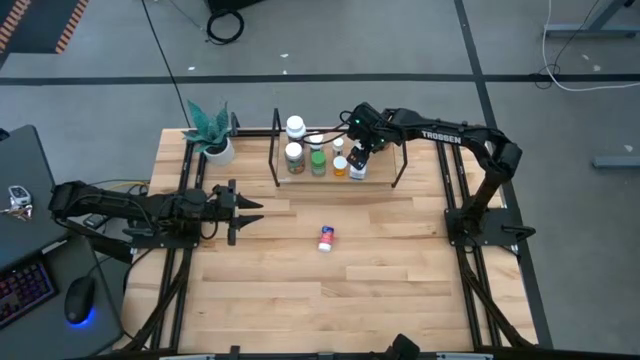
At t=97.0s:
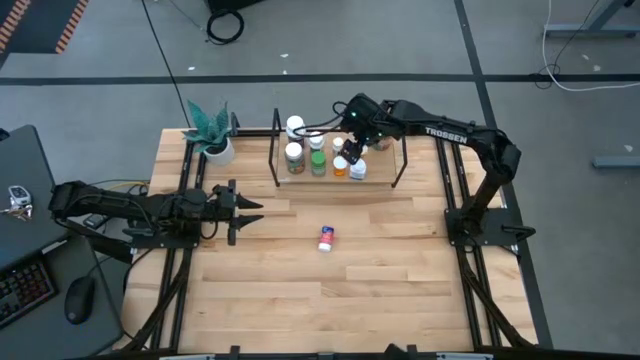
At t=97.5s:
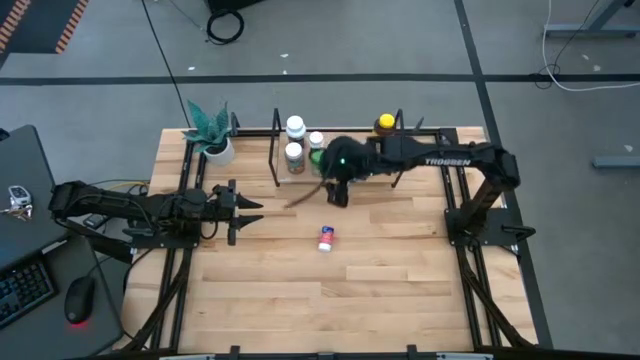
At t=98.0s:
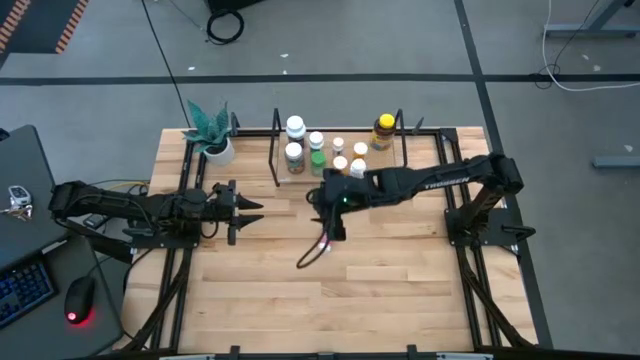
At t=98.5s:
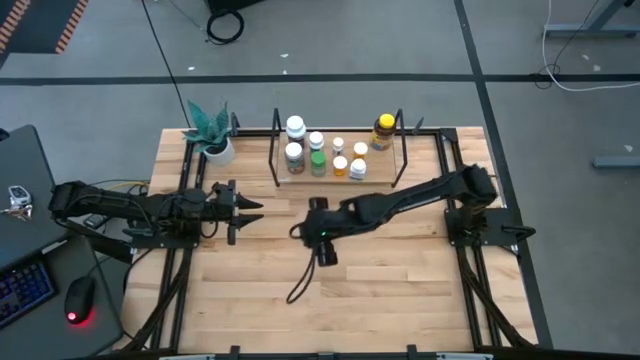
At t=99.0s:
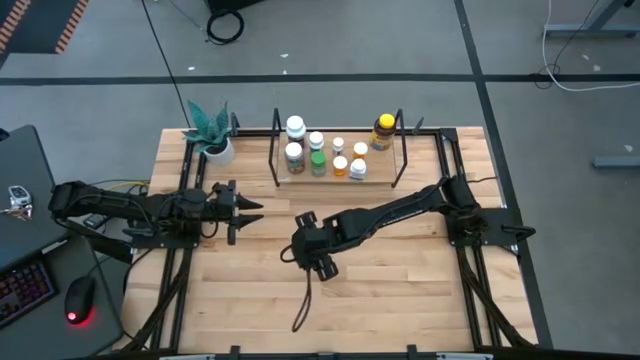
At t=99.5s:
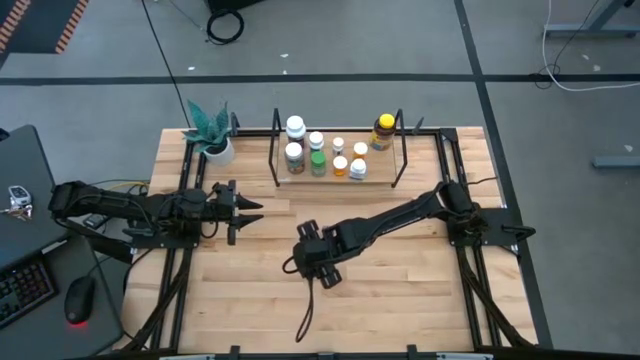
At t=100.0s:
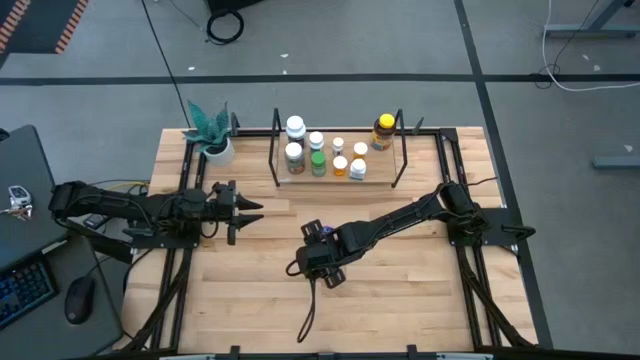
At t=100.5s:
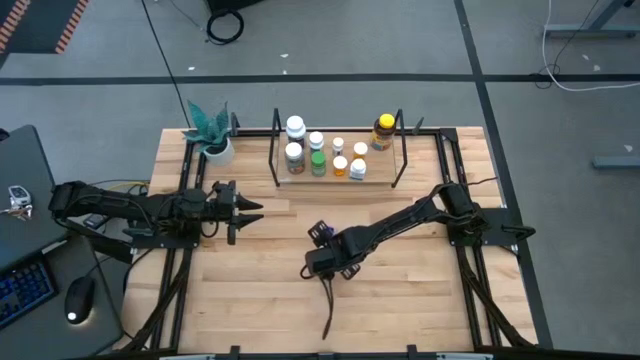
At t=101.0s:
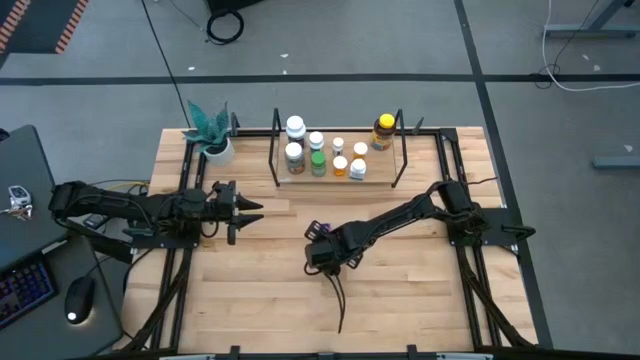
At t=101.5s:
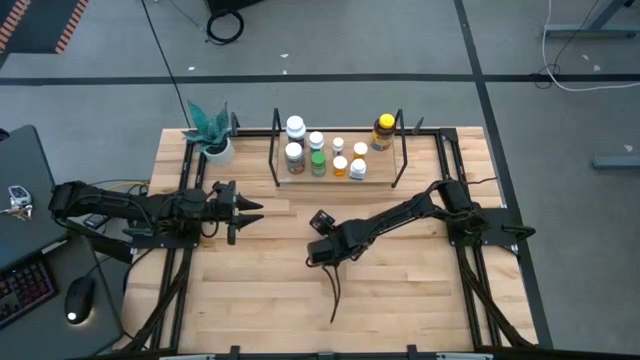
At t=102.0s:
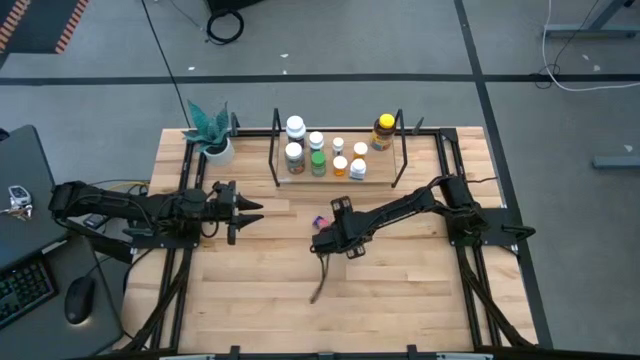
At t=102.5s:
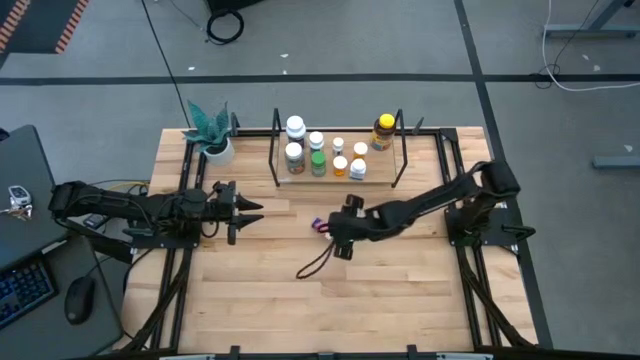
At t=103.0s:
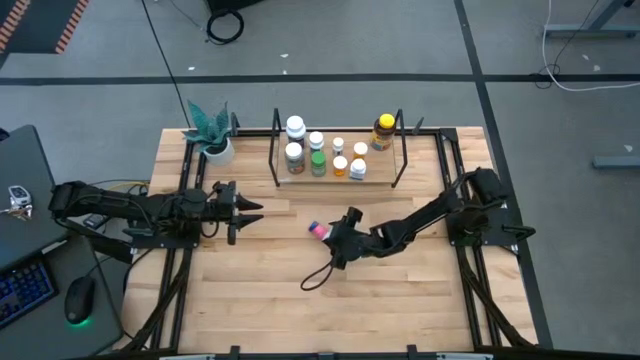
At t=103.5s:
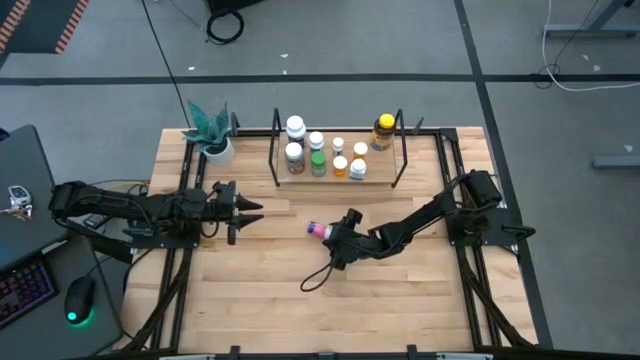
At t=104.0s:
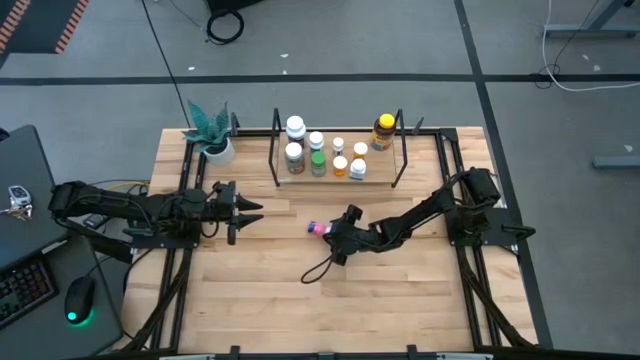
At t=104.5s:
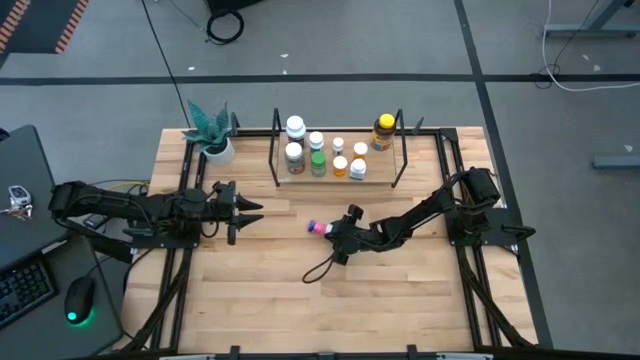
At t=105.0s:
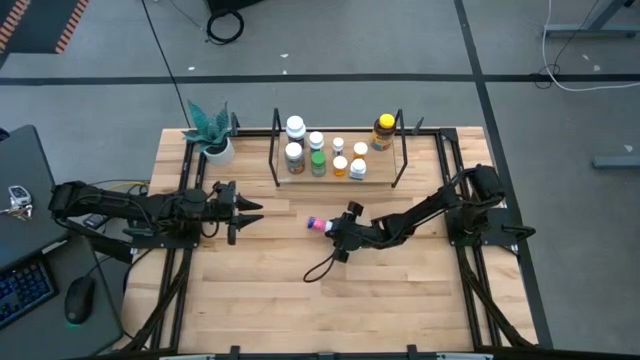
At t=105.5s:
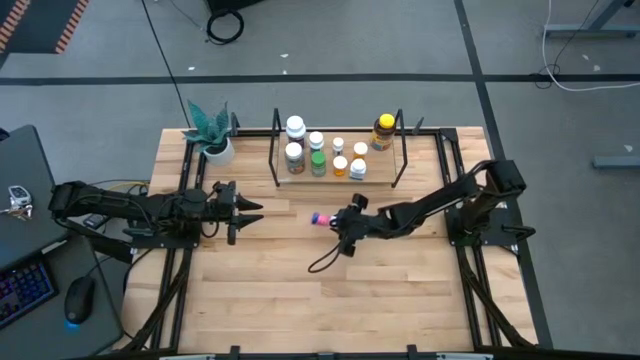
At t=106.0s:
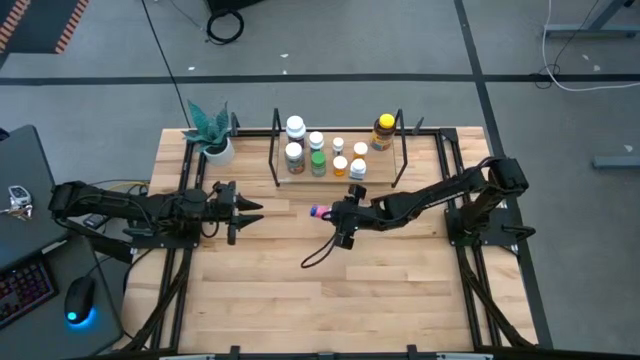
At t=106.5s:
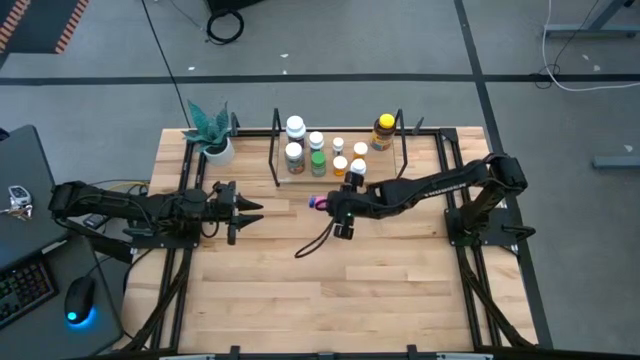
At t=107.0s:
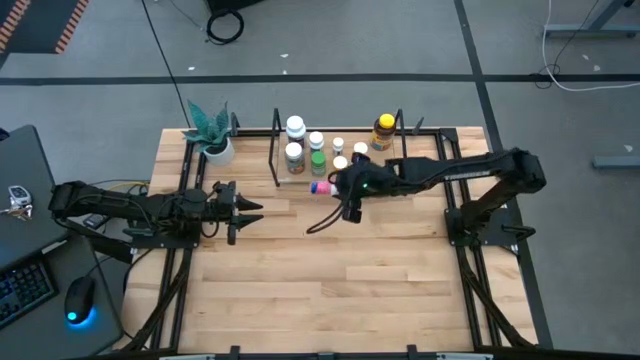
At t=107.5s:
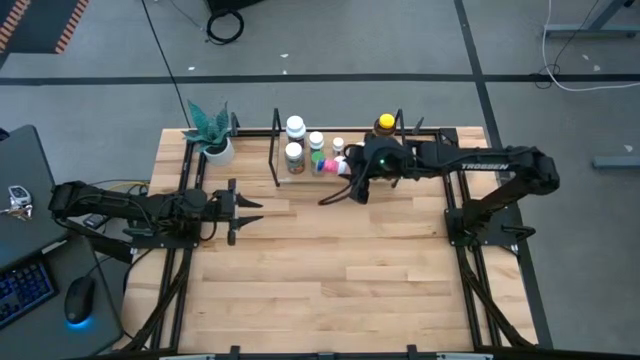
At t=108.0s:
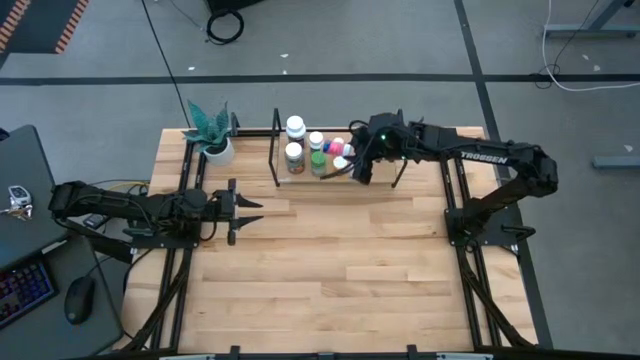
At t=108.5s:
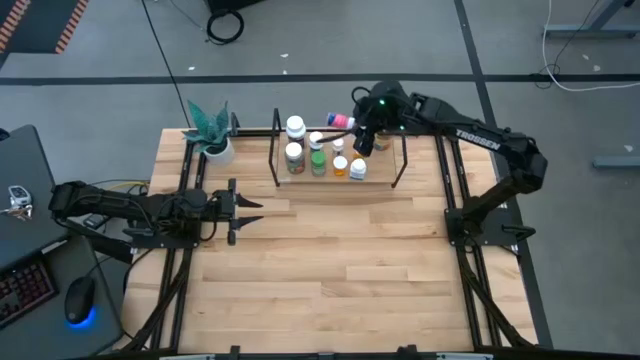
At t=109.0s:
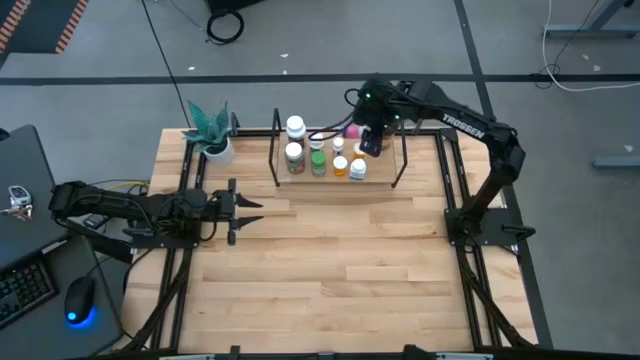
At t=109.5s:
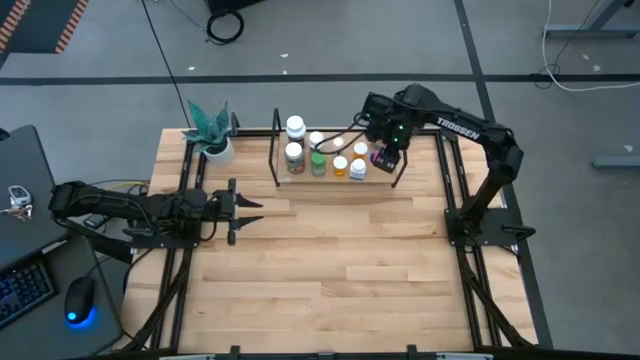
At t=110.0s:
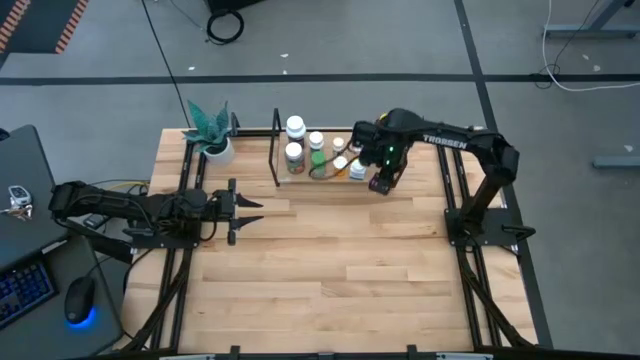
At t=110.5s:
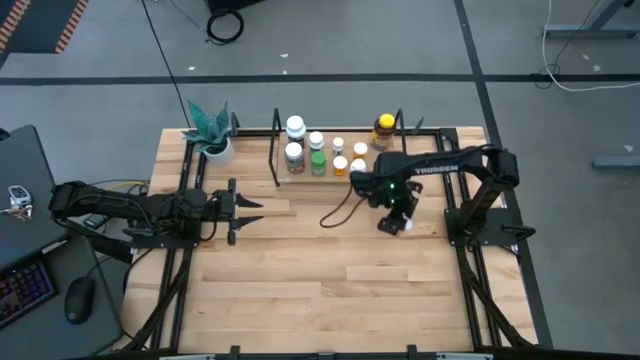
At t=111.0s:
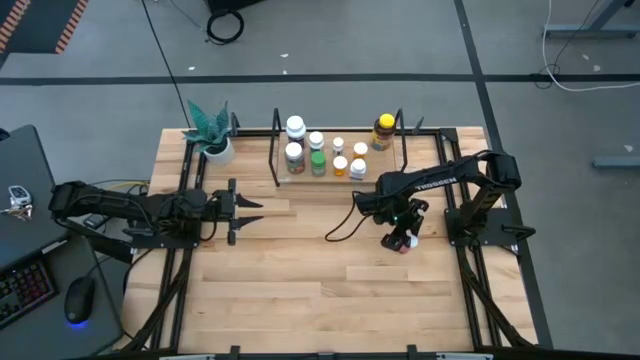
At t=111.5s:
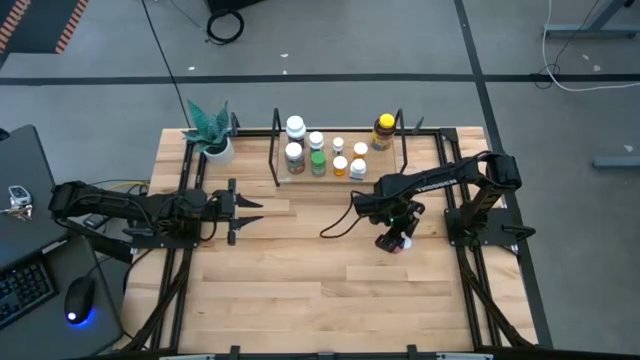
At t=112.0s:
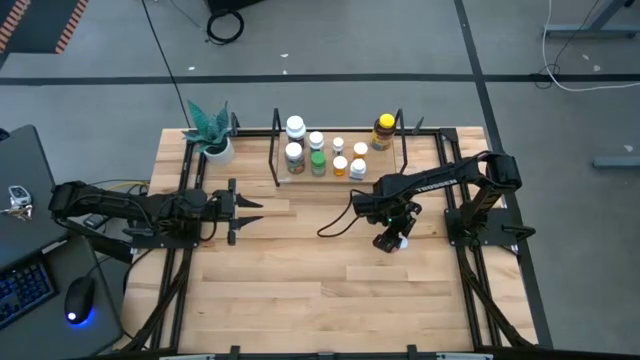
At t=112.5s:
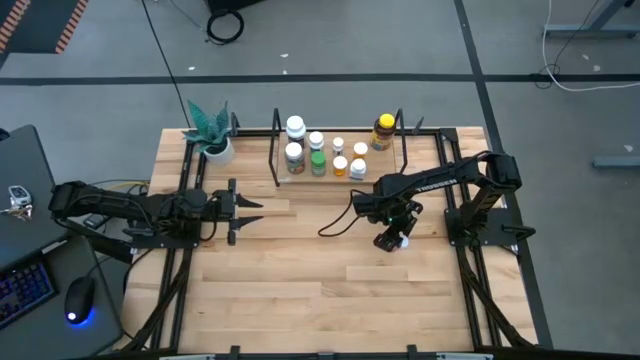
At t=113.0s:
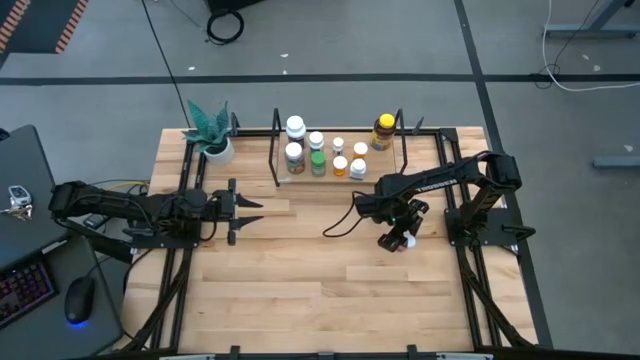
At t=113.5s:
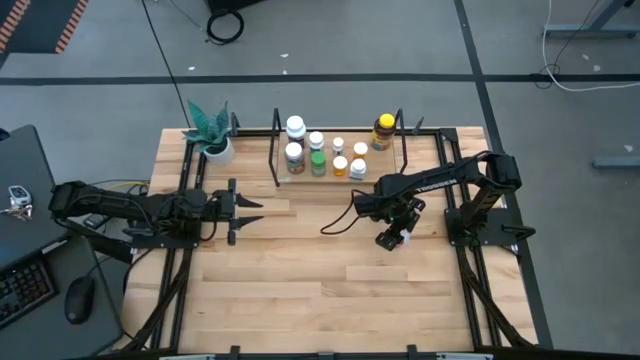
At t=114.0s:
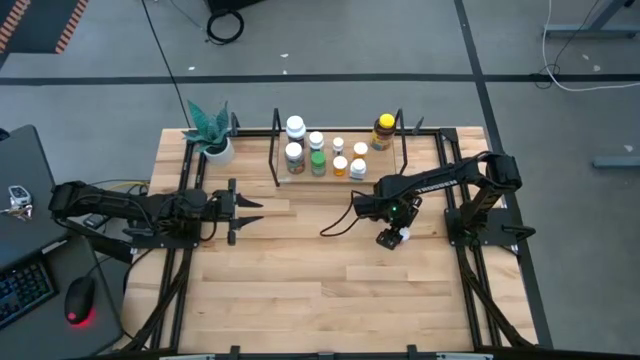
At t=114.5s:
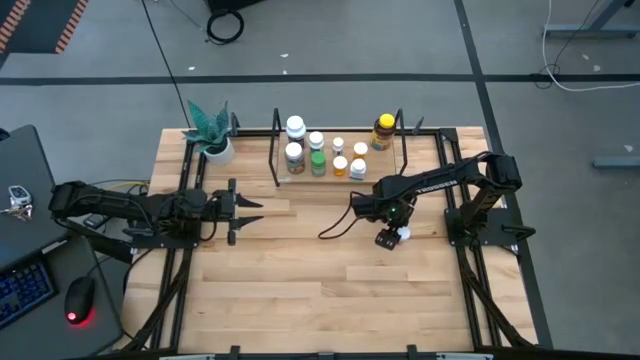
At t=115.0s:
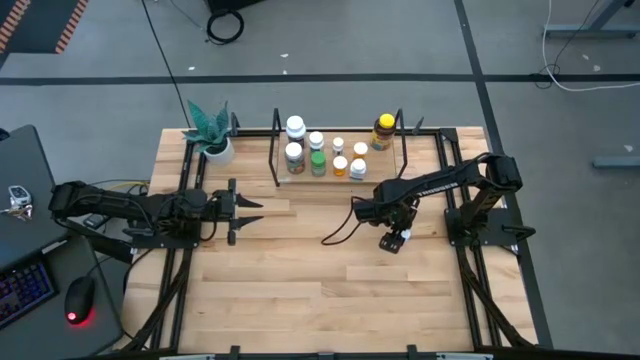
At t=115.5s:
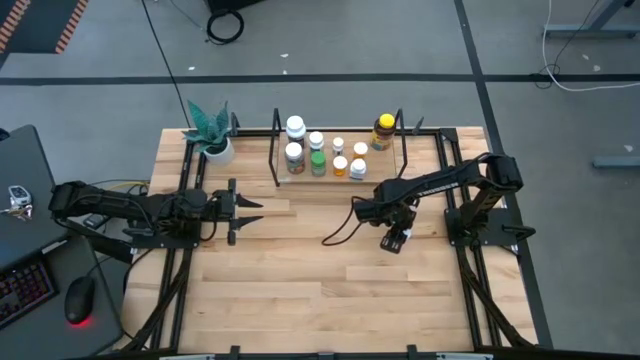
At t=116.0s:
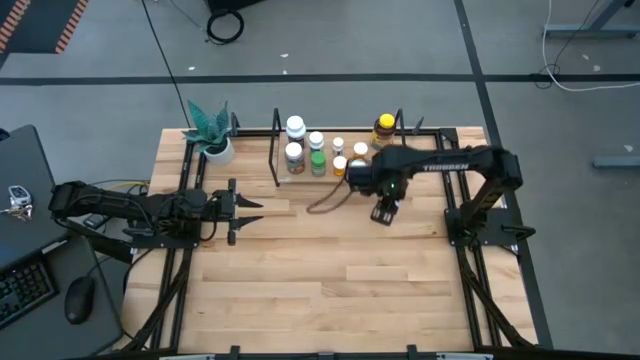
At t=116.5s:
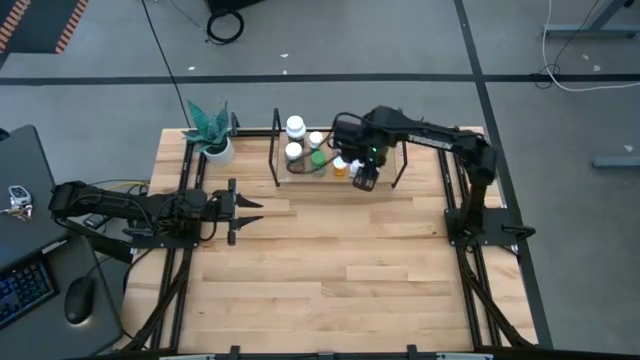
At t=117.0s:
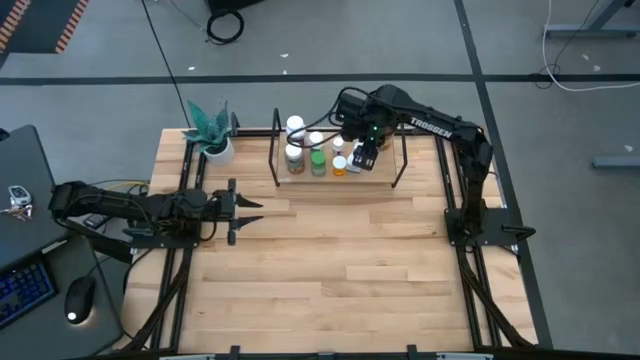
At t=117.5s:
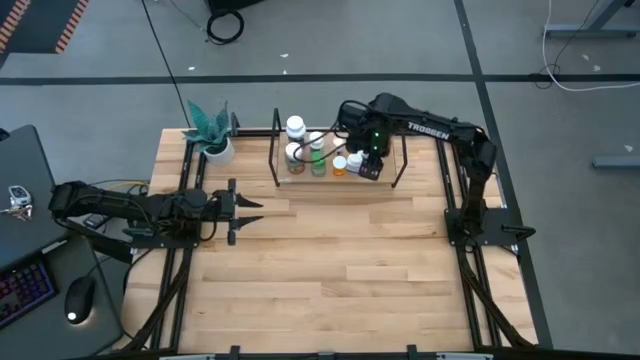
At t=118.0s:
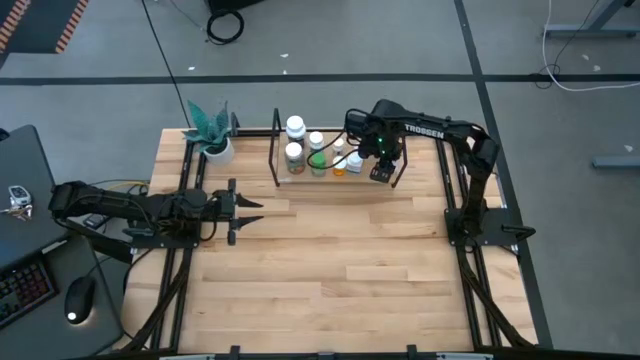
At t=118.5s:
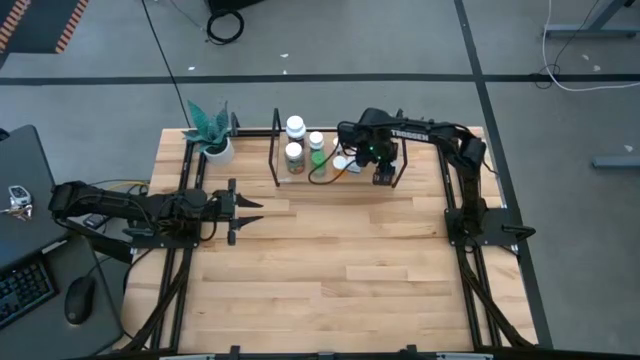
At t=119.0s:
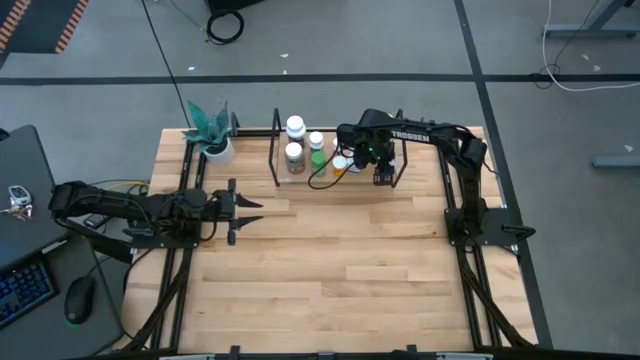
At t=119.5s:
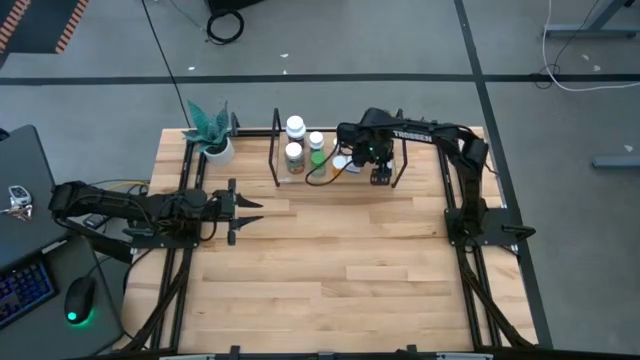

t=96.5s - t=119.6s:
Task: Pick and place medicine bottles onto shelf by color
Put the pink pill bottle on the shelf
